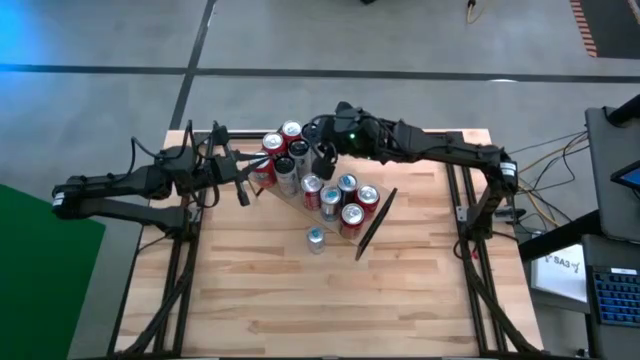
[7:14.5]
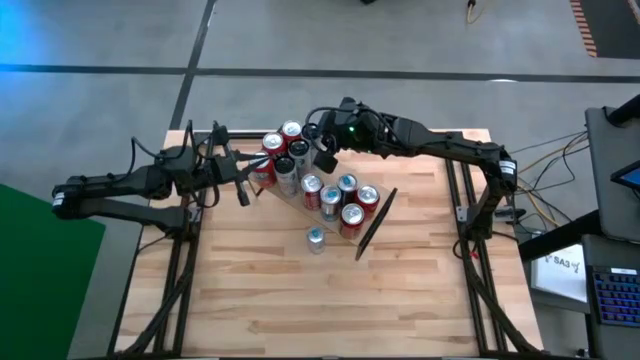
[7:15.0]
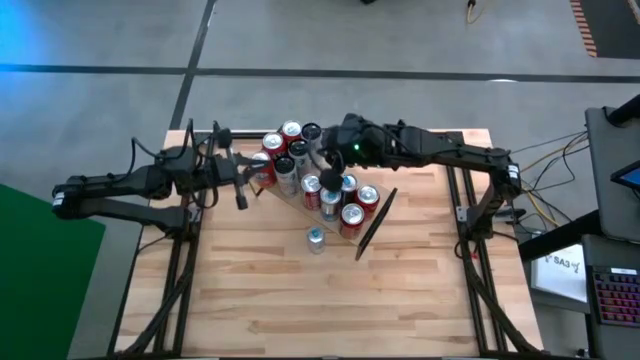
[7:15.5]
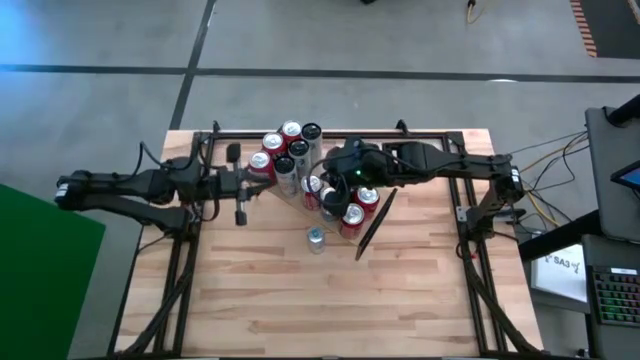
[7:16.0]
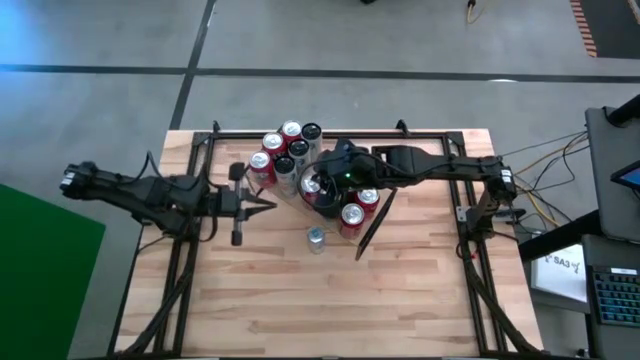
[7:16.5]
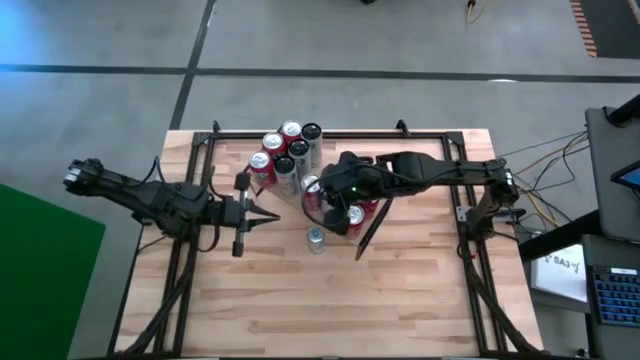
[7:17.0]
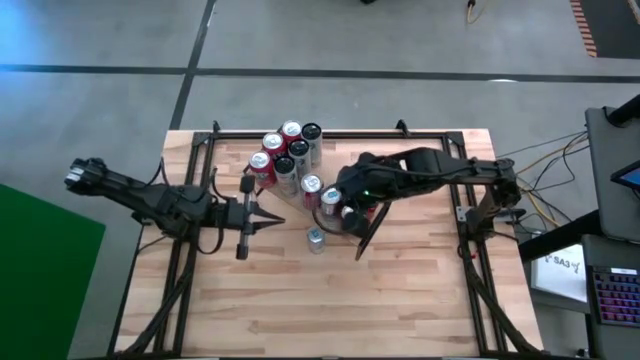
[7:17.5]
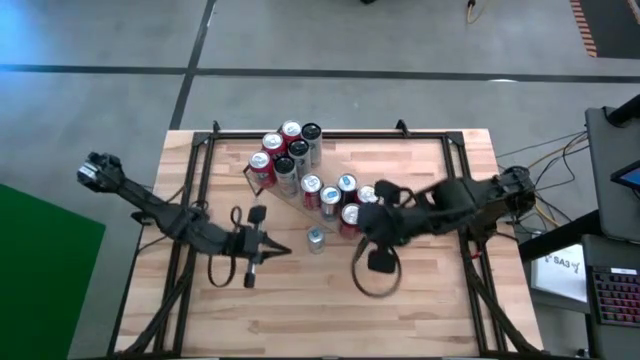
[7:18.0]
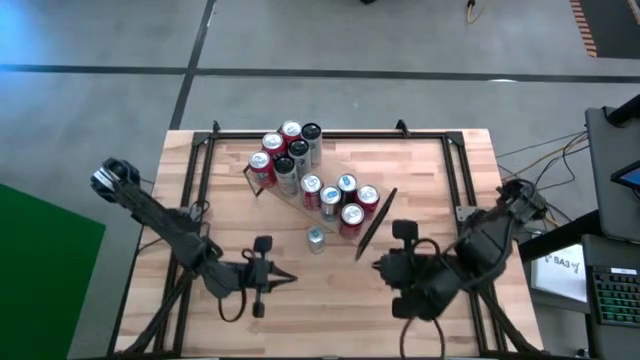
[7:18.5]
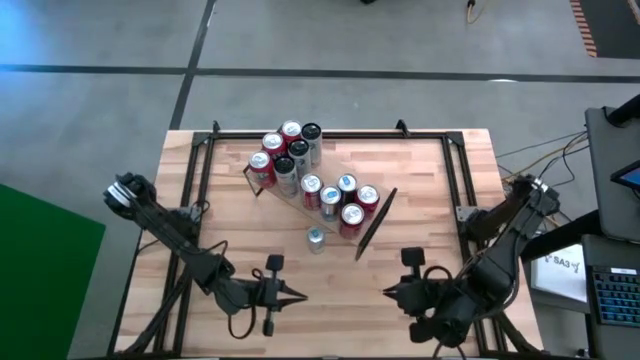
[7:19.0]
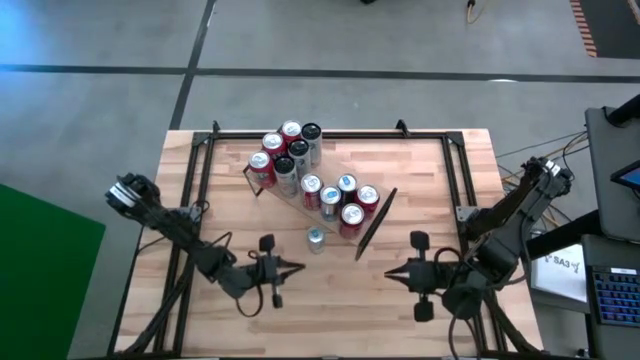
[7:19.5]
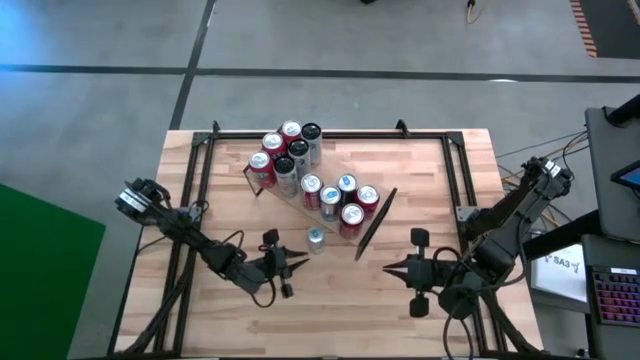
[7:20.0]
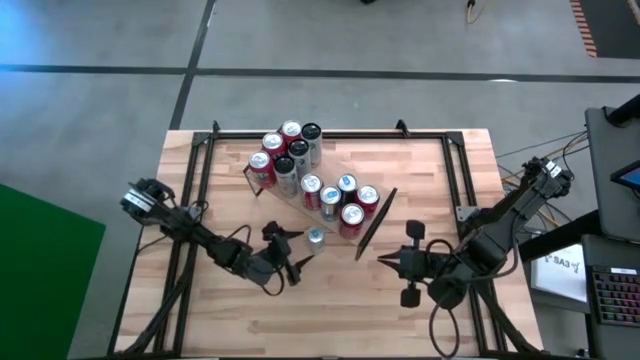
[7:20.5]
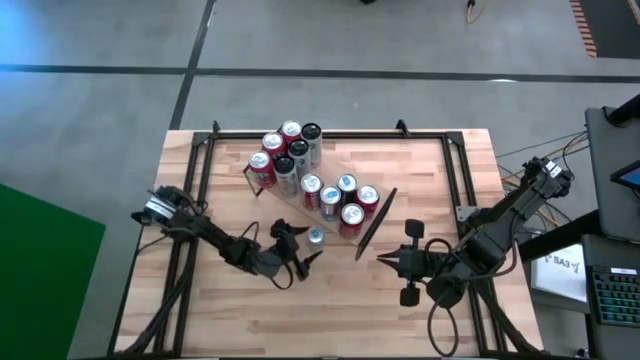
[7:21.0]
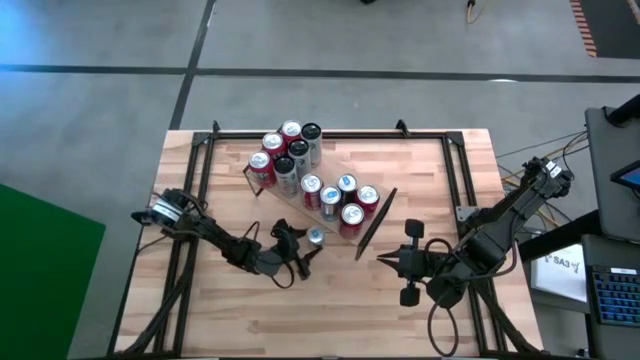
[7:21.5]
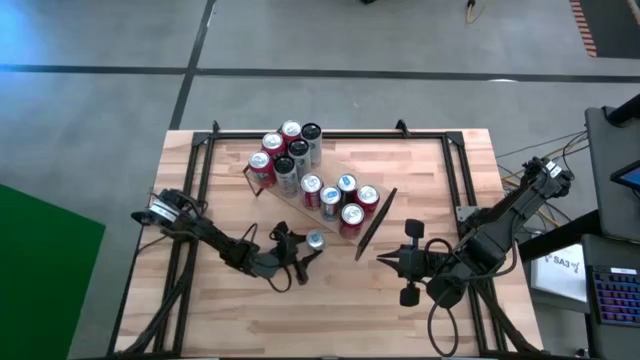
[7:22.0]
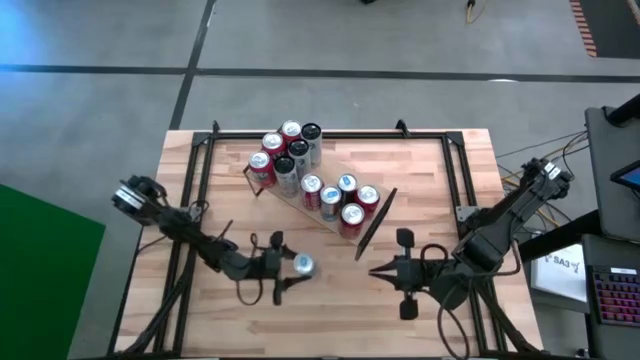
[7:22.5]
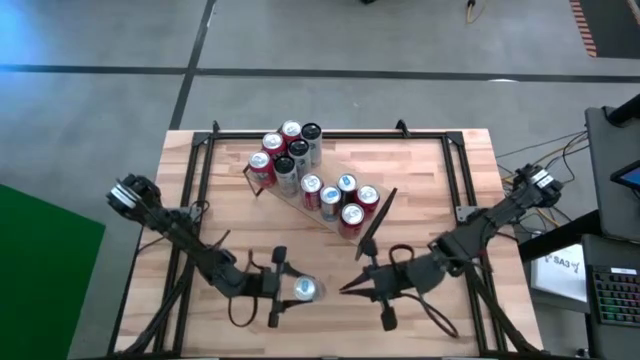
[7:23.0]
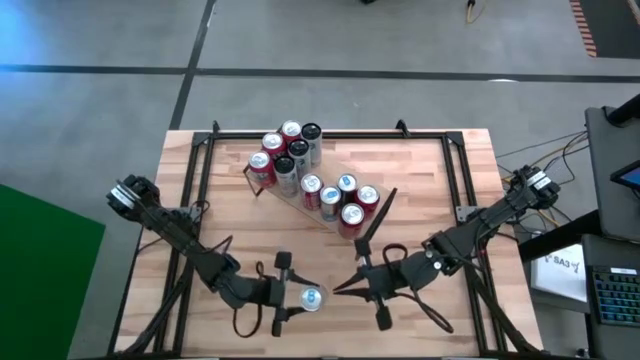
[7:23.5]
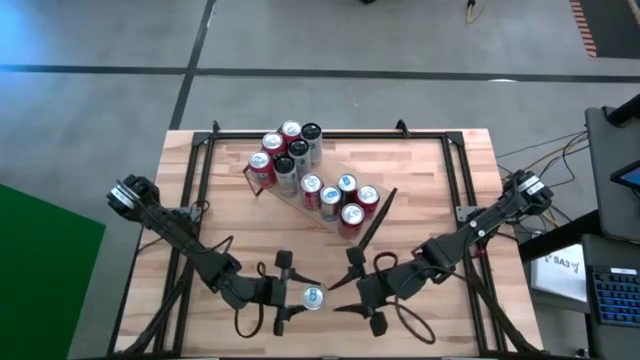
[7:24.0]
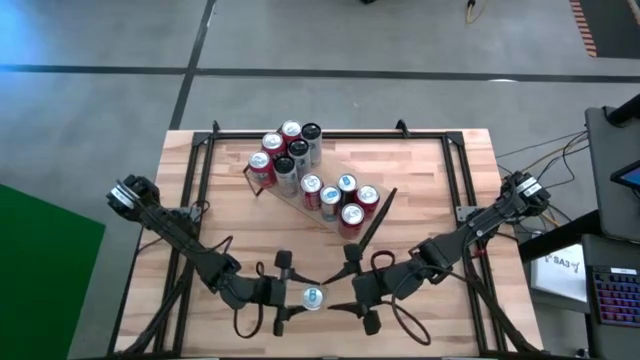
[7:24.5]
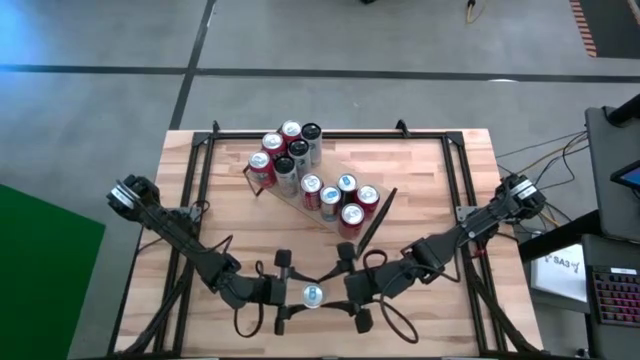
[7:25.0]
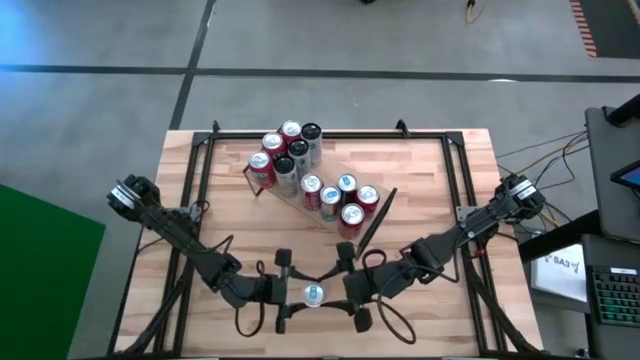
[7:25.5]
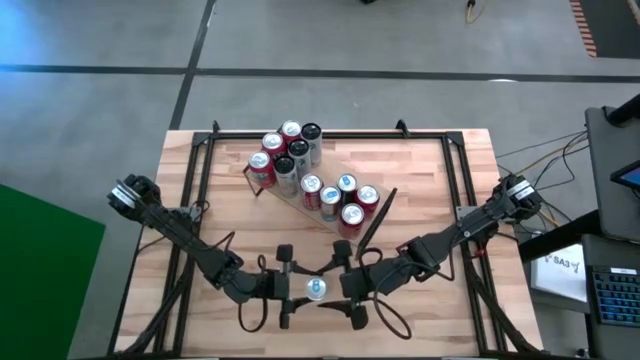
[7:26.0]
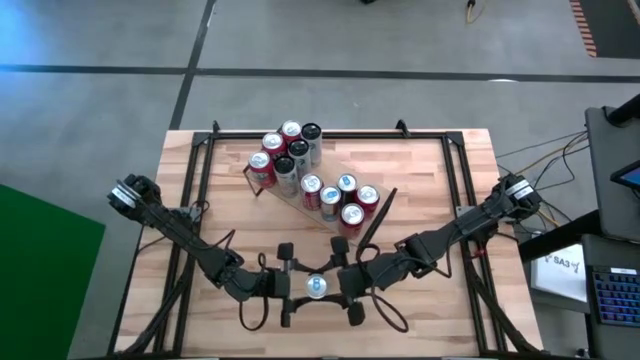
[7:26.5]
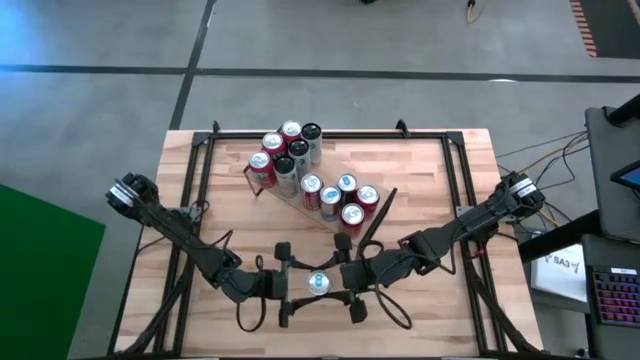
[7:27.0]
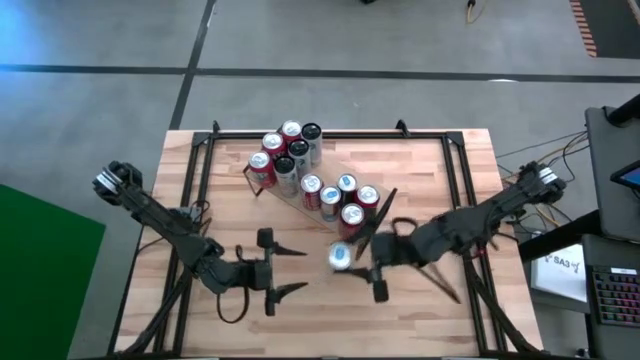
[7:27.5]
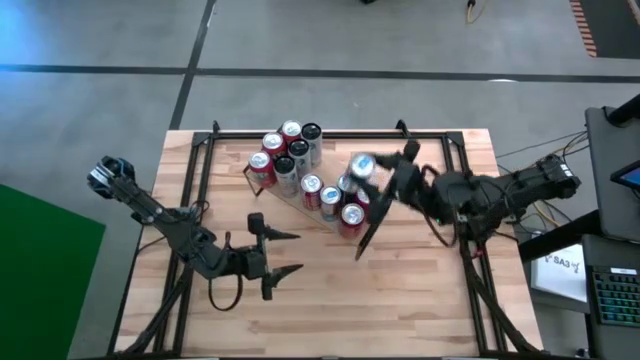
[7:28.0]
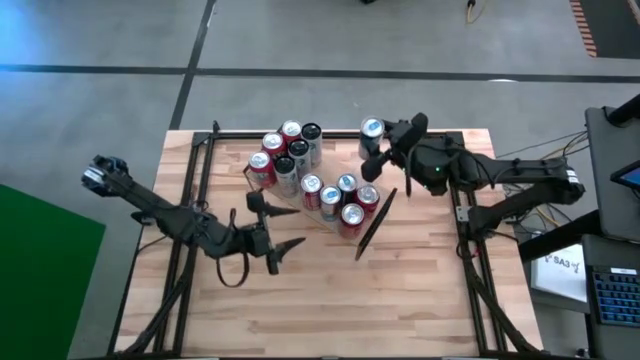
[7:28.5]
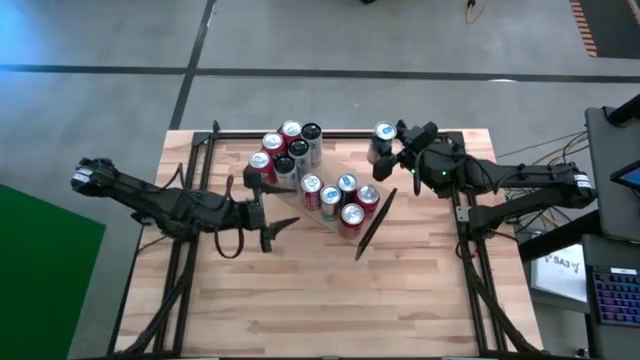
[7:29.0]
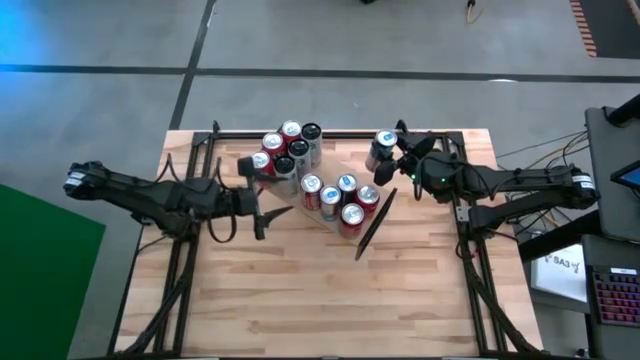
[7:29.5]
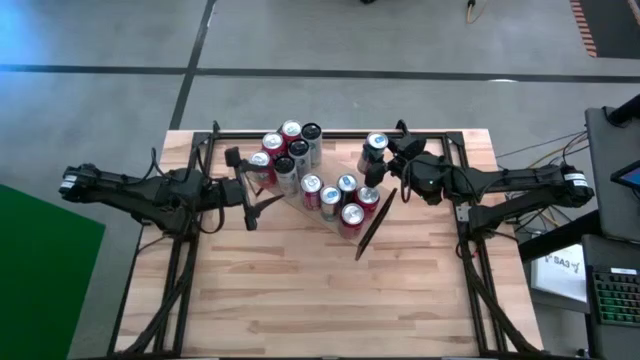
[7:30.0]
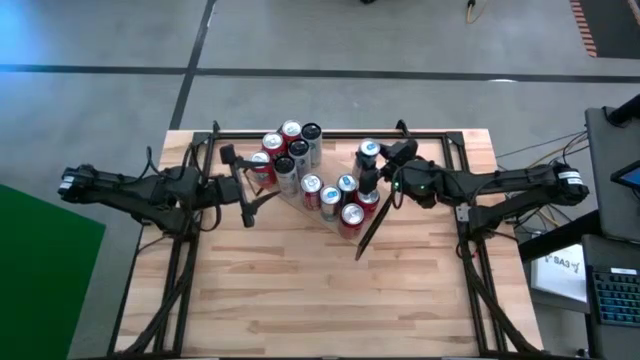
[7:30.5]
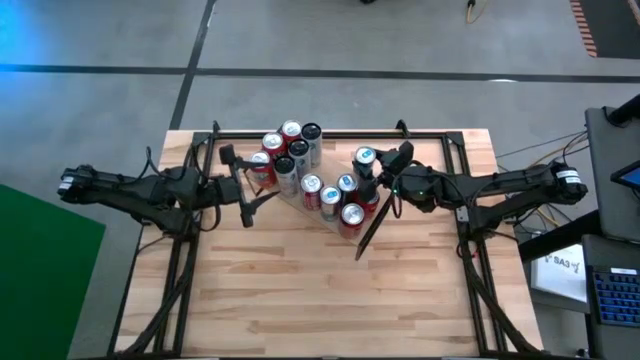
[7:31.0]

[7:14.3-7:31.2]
Task: Place canned beverage on shelf
Put the silver/blue soda can on the shelf, align with the other silver/blue soda cans

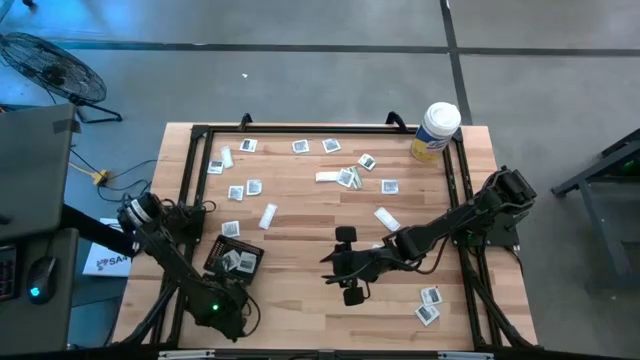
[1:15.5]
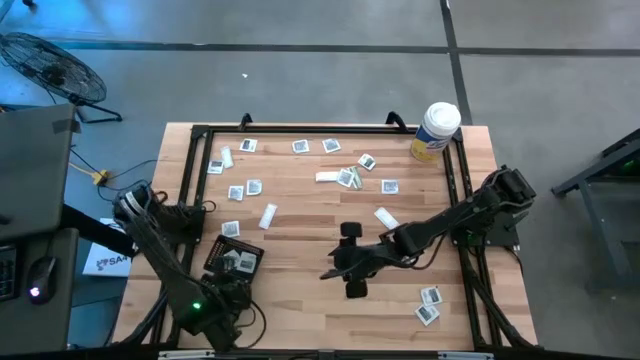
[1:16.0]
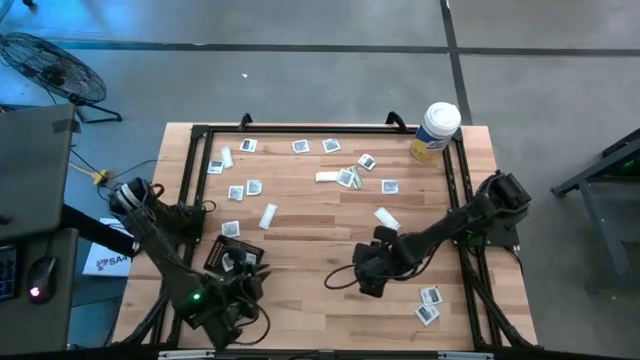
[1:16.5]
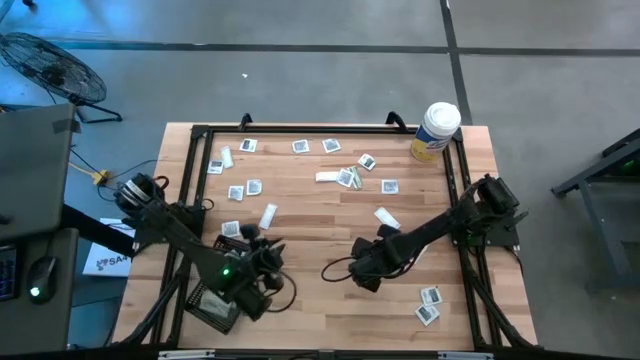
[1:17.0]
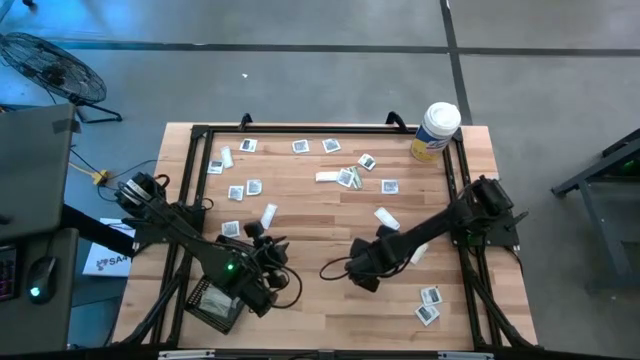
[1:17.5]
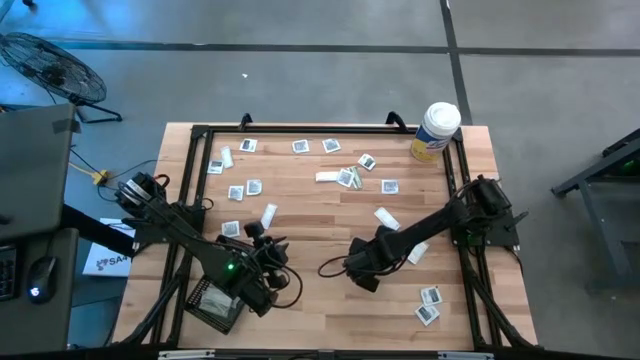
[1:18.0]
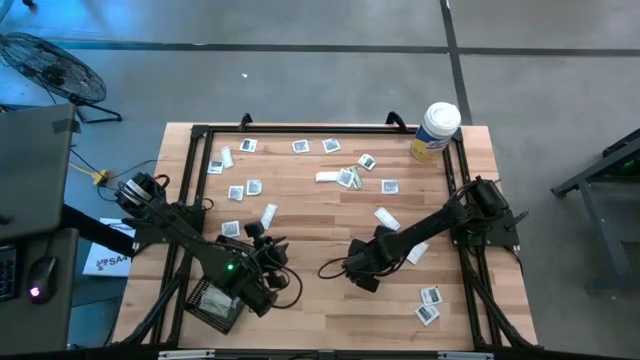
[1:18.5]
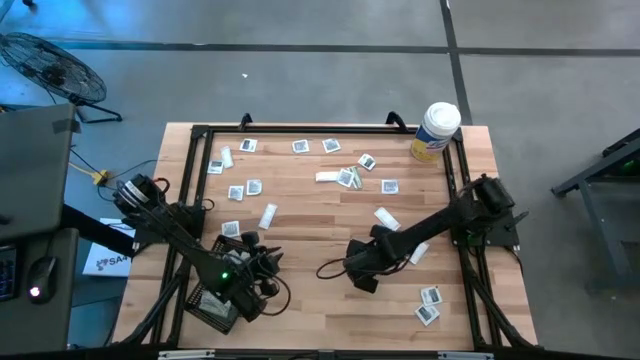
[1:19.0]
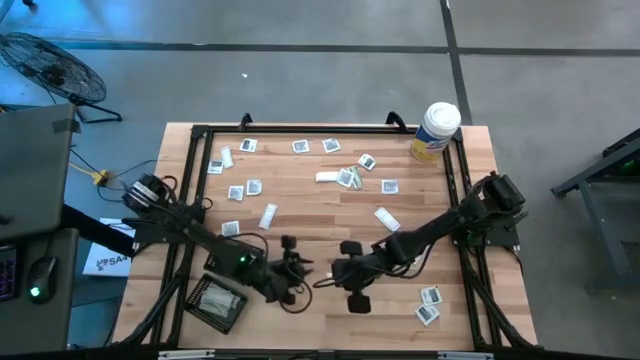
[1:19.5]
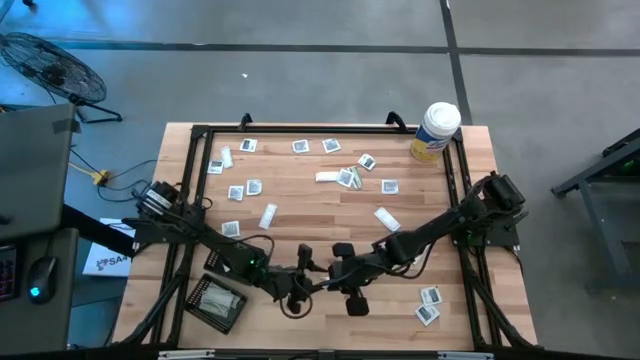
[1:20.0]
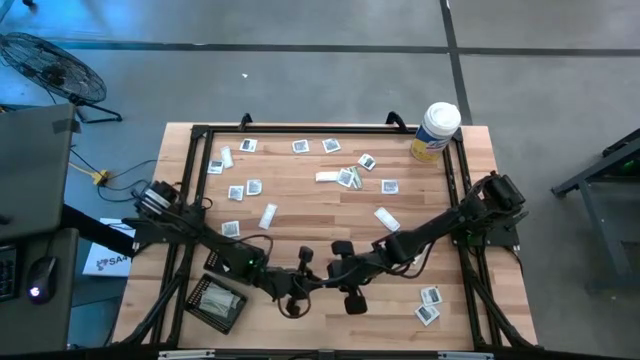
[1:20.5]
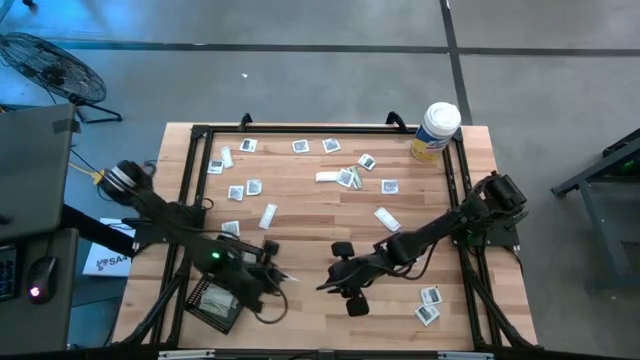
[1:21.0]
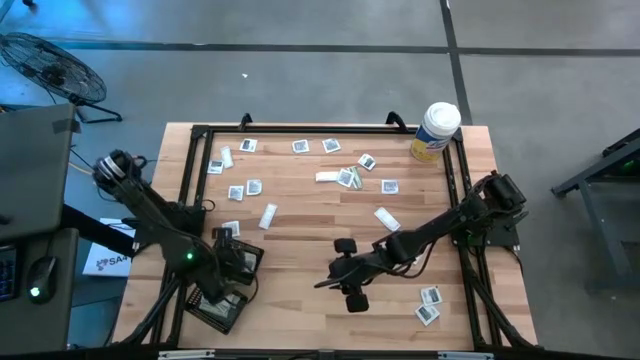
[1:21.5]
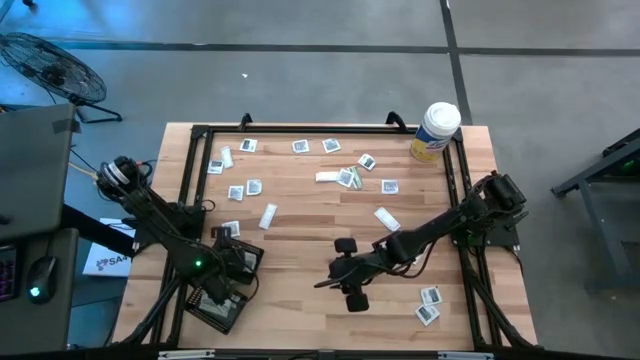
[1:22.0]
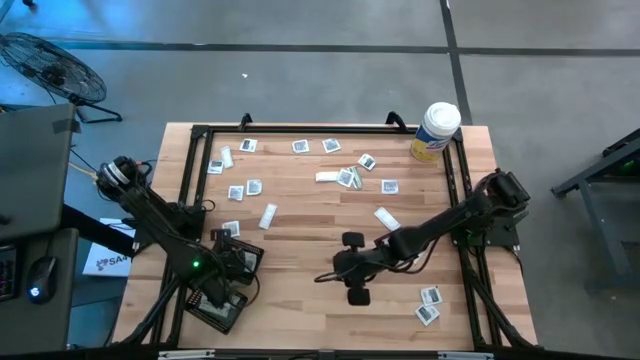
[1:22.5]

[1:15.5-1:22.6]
Task: Pick & Place First Aid Supplies
Put the towelette pack into the top black bin
